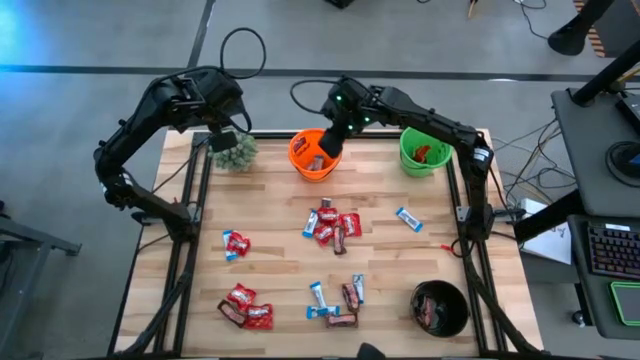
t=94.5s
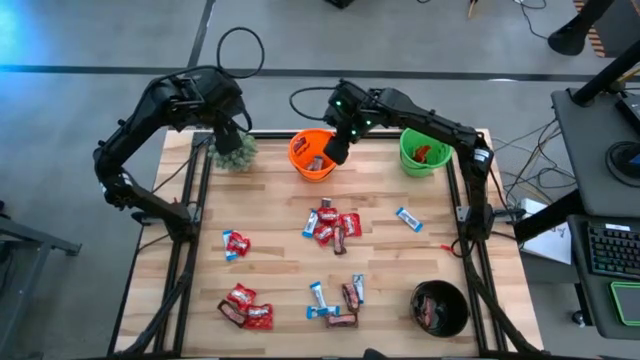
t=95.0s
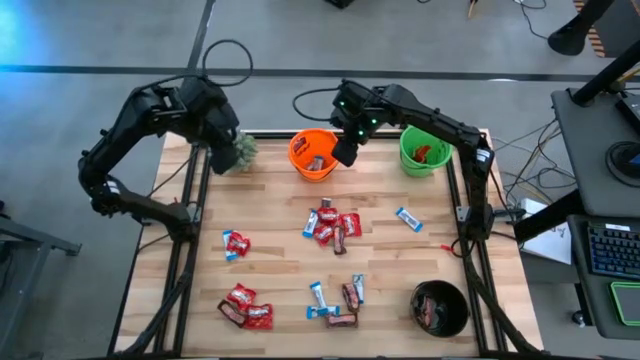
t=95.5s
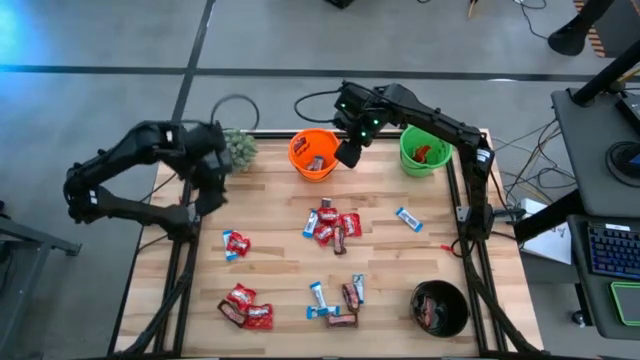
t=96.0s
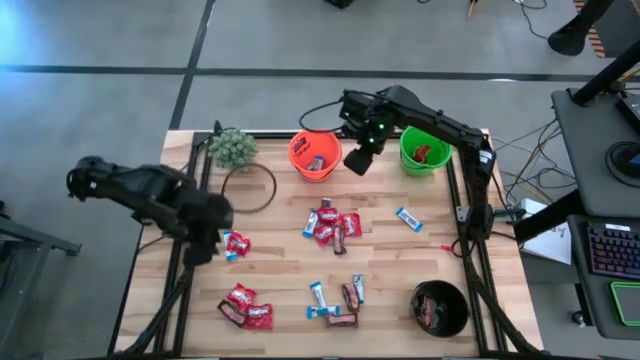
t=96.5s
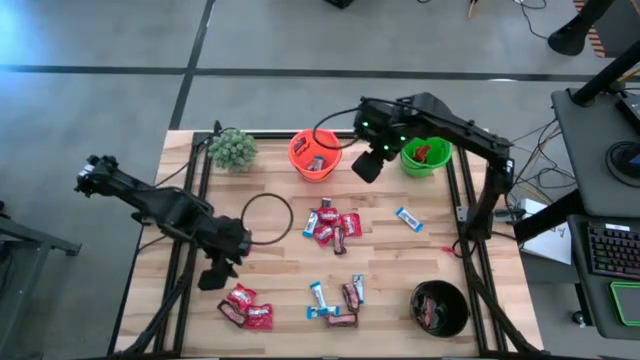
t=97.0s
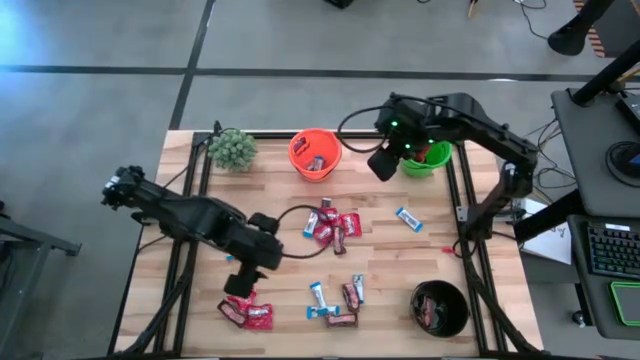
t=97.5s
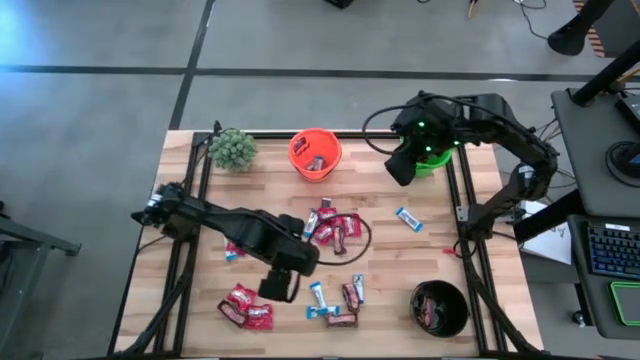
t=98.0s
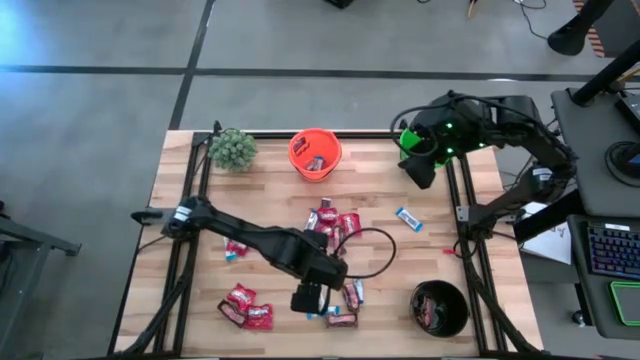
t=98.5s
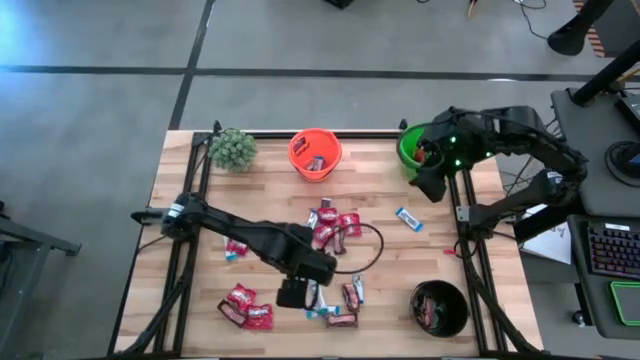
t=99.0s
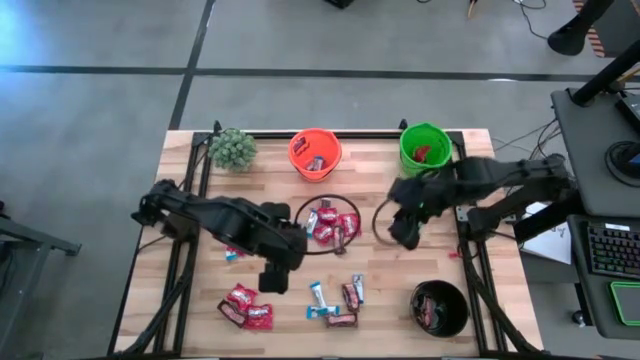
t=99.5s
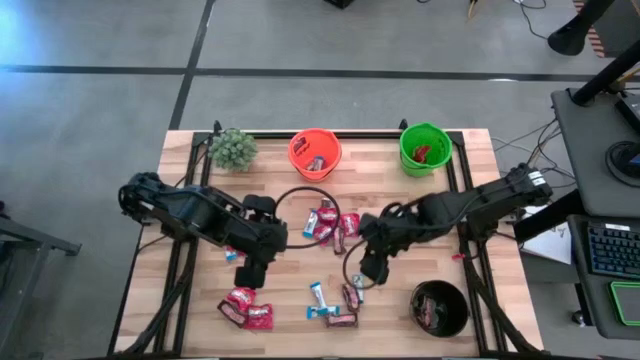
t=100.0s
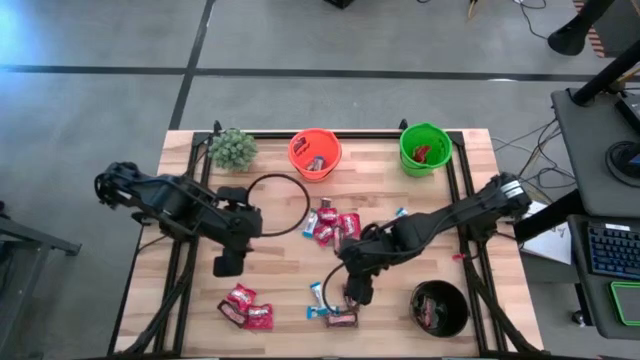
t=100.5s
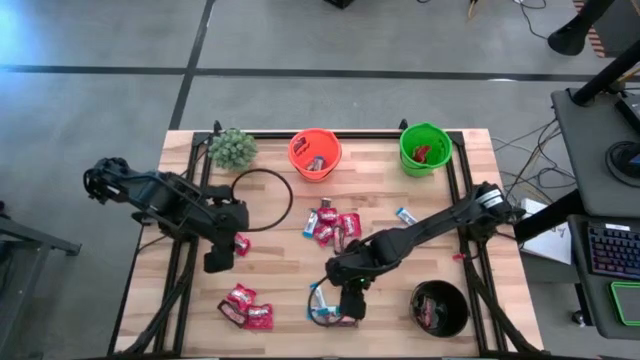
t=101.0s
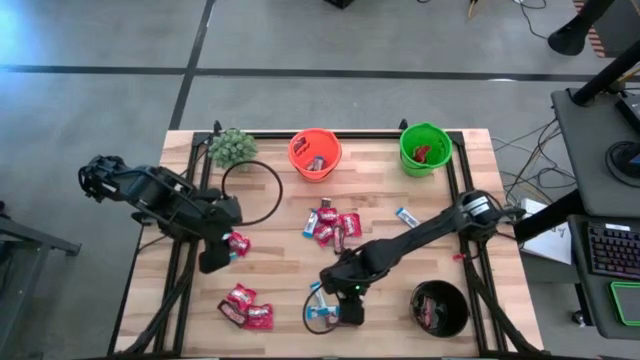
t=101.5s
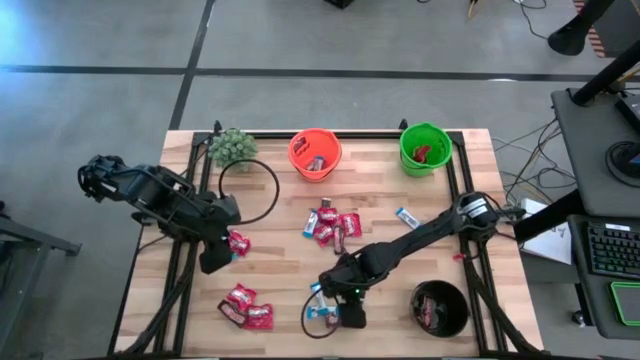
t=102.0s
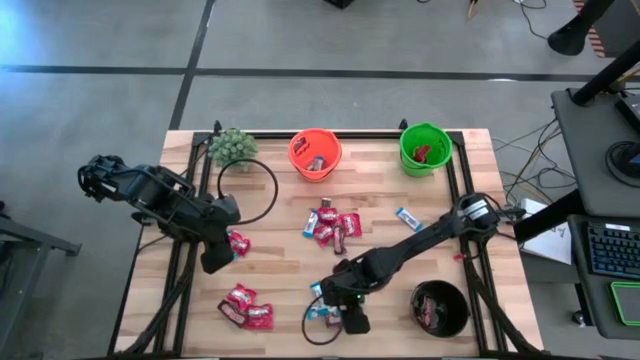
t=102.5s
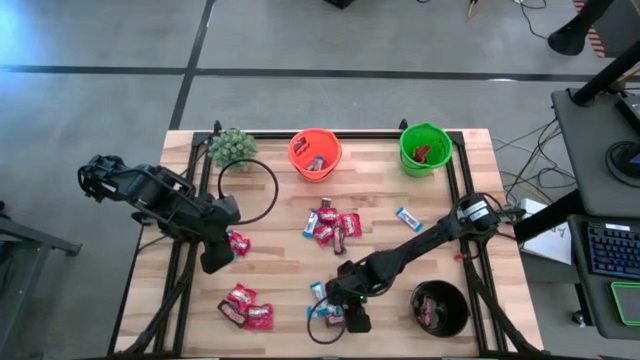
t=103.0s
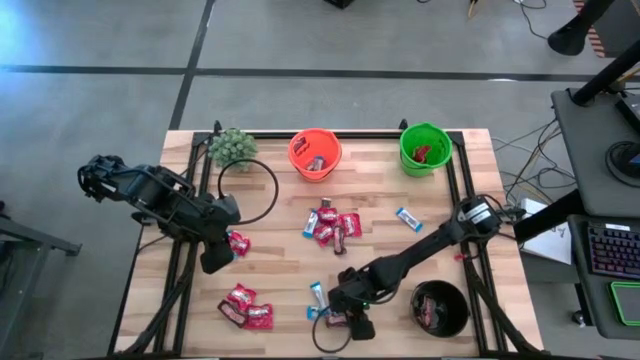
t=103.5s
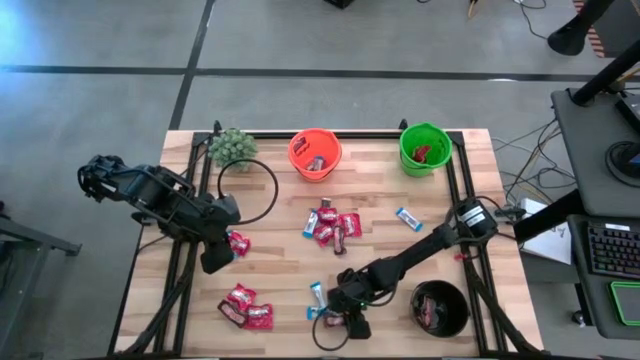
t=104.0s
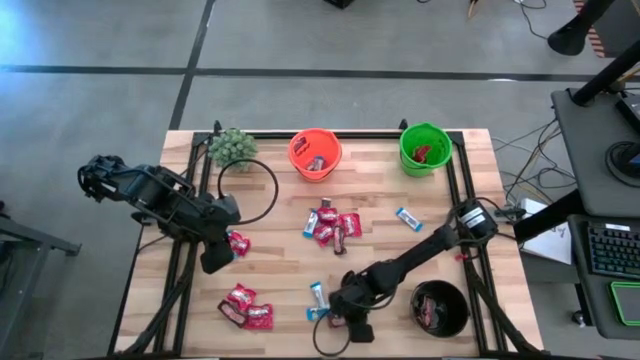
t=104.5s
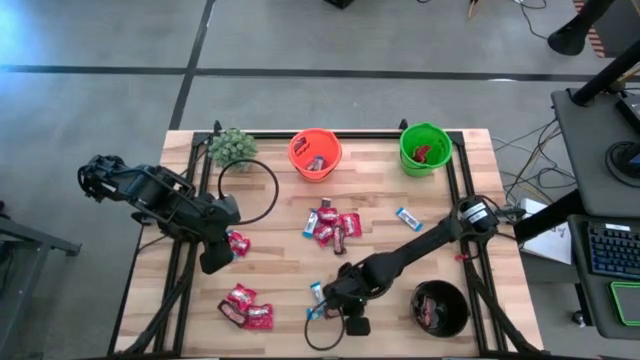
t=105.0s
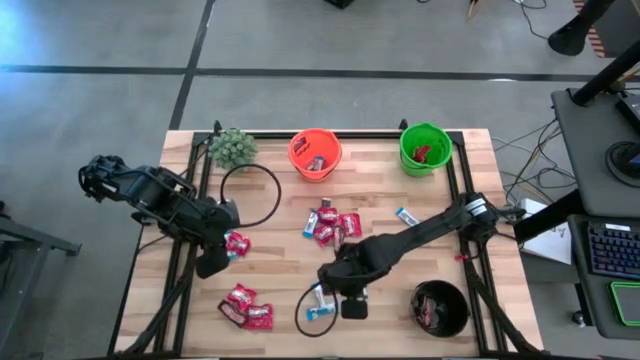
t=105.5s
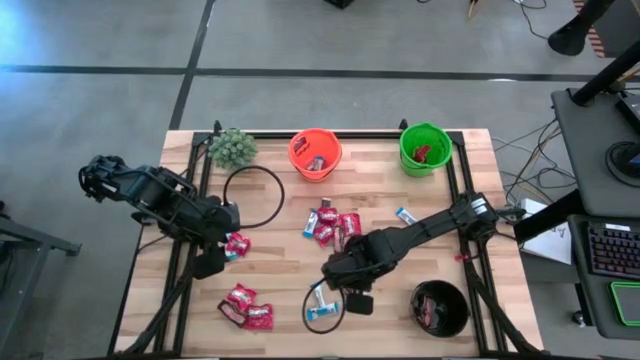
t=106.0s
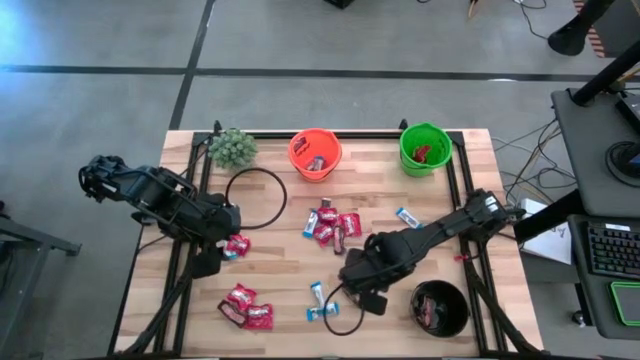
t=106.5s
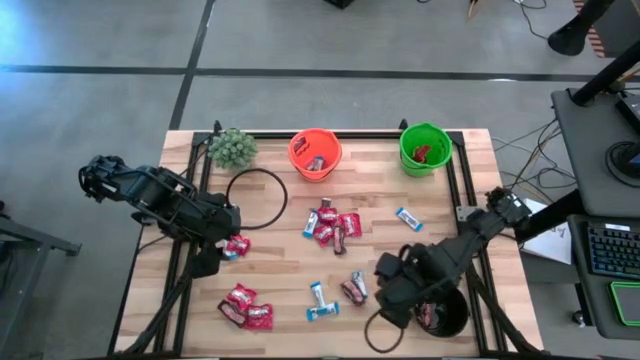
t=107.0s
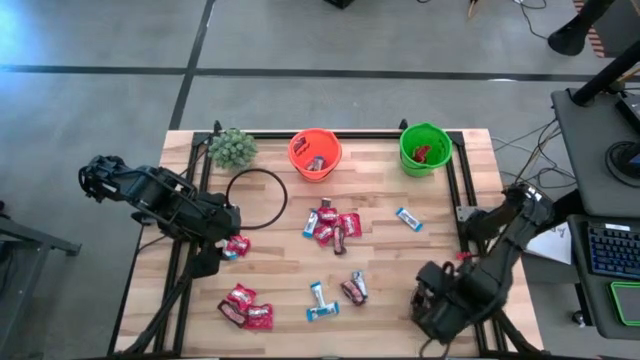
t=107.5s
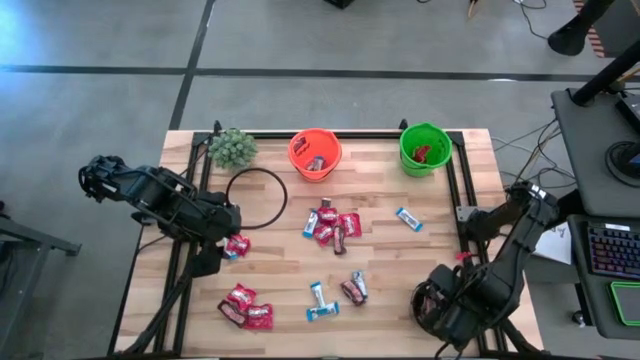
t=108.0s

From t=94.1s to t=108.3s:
Task: Sort candy
Put the brown chocolate into the black bucket

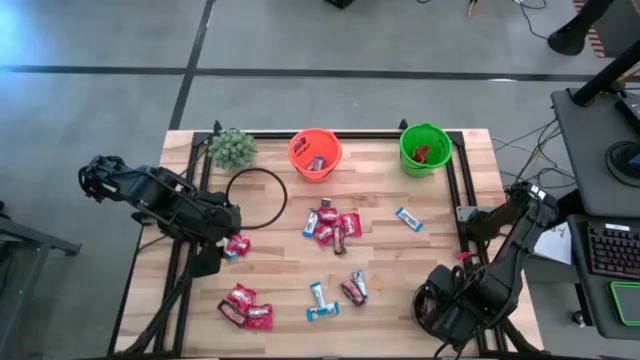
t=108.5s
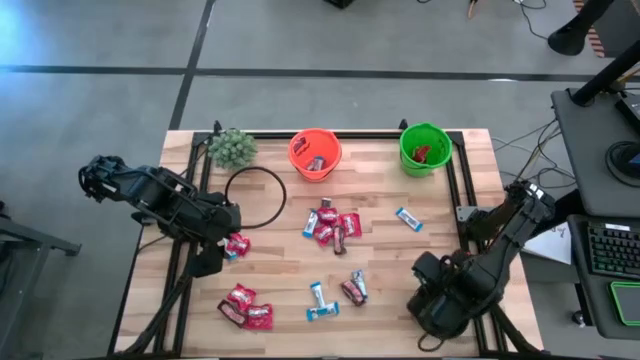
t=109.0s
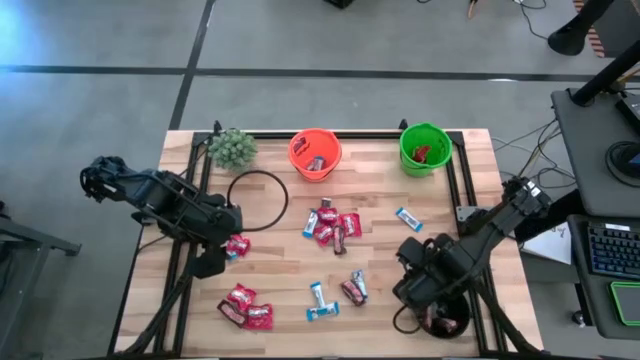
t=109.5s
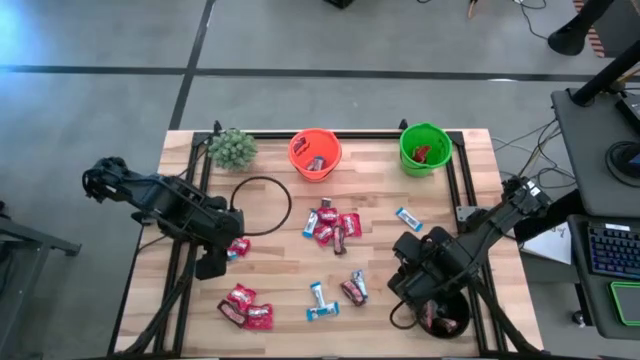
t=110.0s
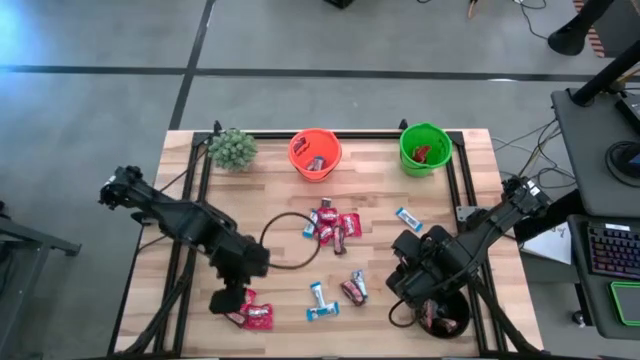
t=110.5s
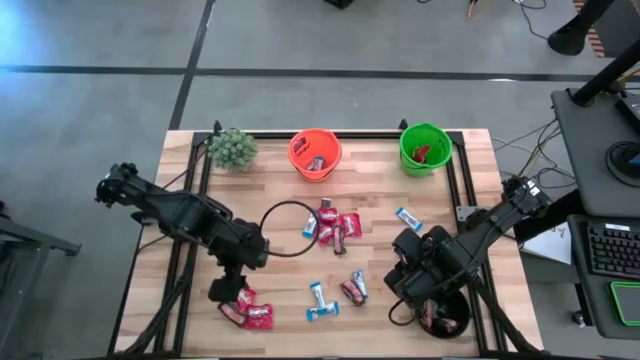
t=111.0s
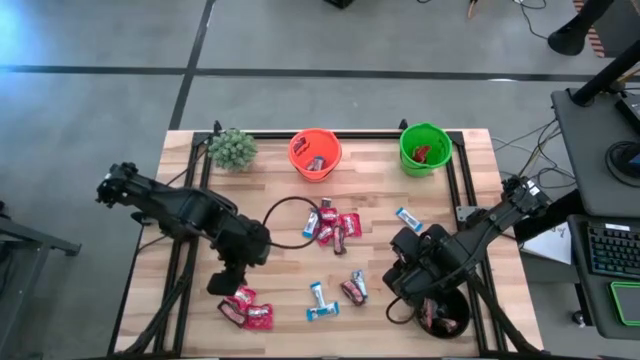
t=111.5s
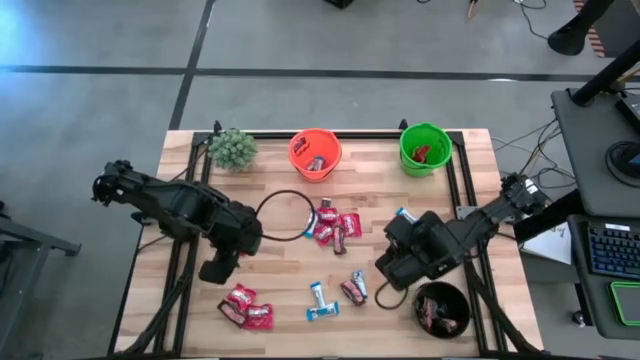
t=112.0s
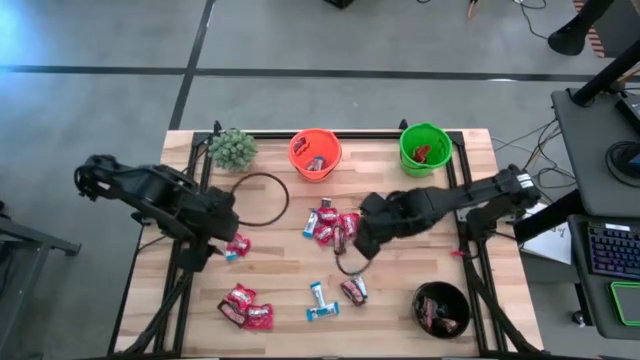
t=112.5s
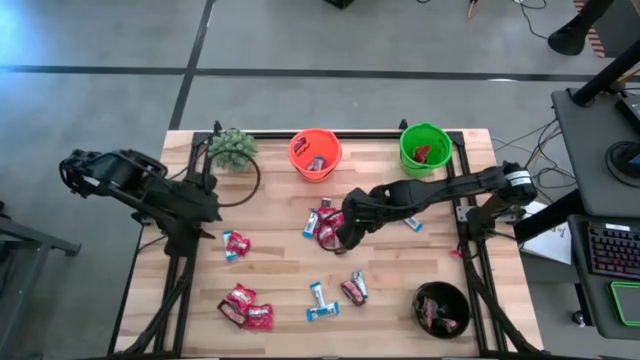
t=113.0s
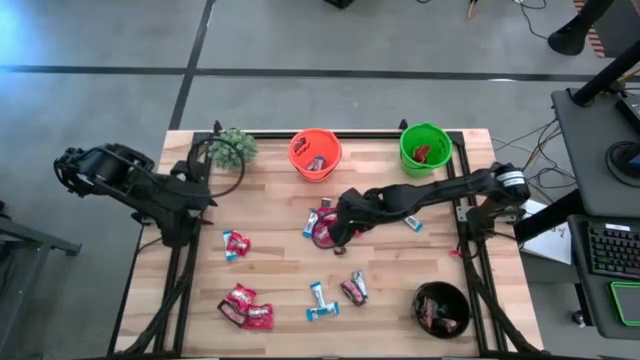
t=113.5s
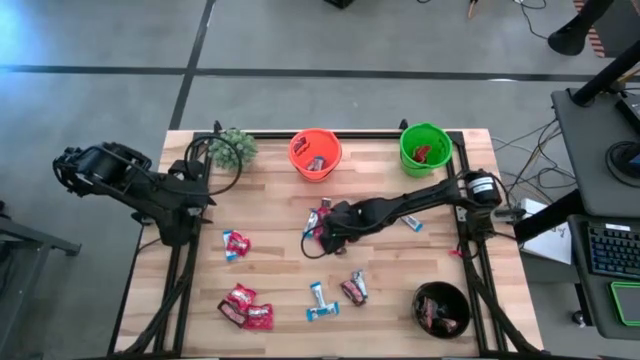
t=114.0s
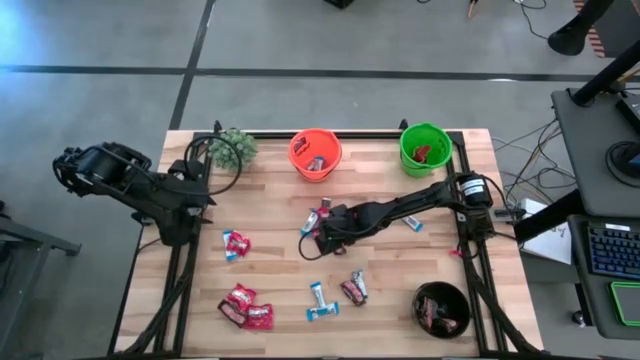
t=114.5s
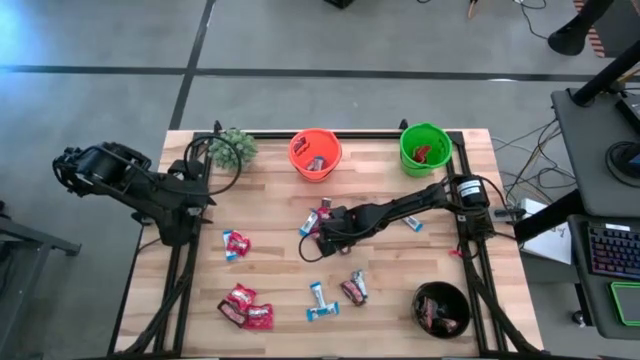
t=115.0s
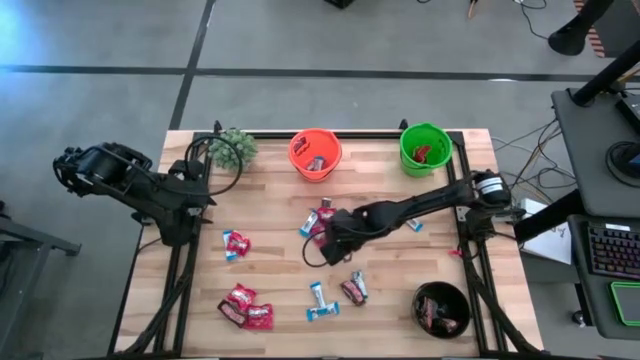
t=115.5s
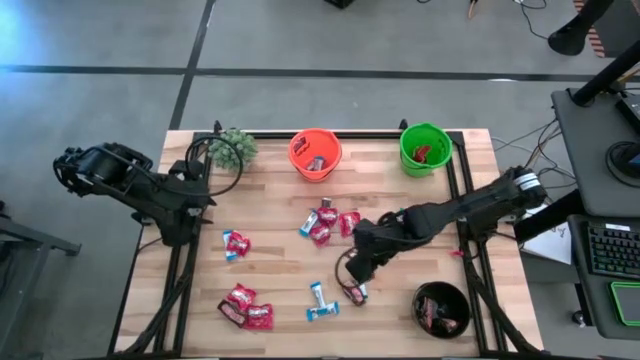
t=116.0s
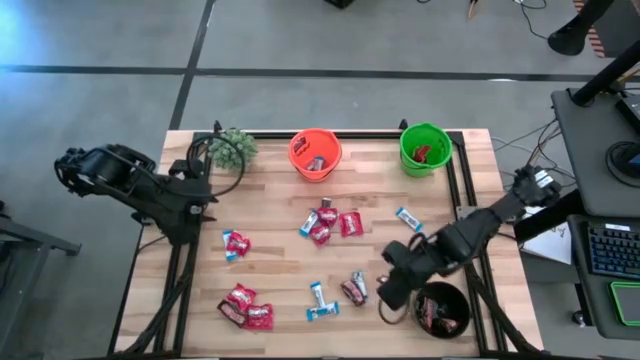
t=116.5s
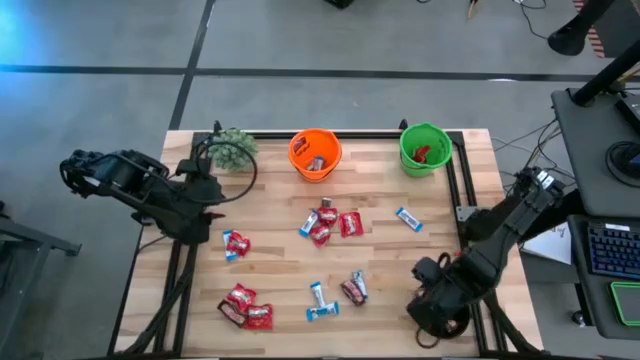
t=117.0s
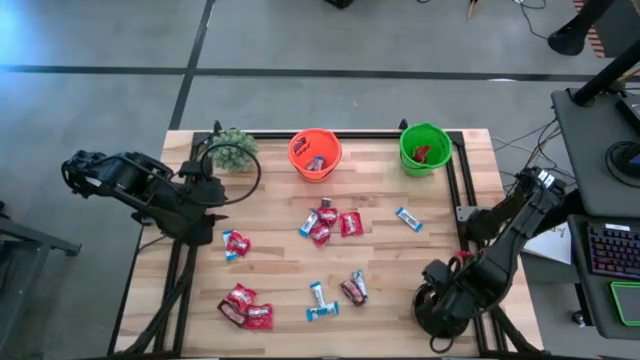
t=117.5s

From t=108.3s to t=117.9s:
Put the brown chocolate into the black bucket
